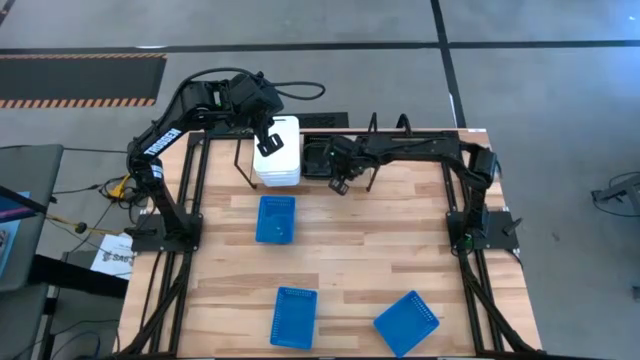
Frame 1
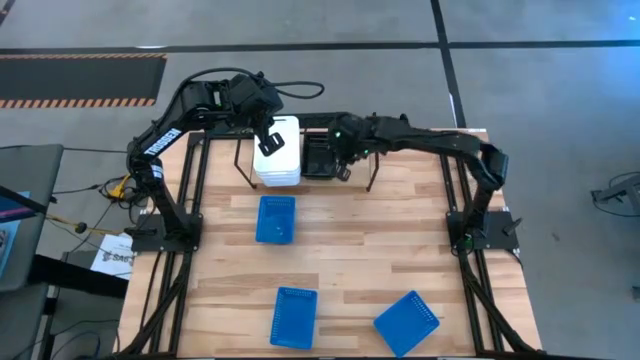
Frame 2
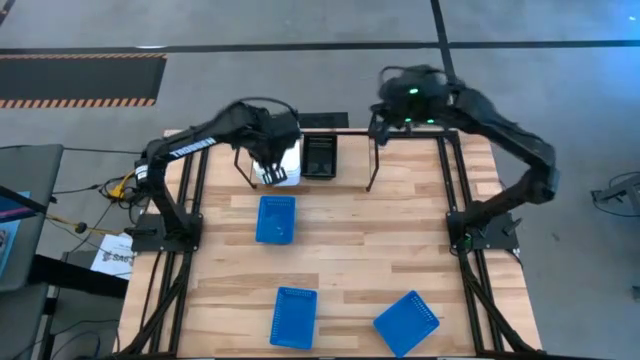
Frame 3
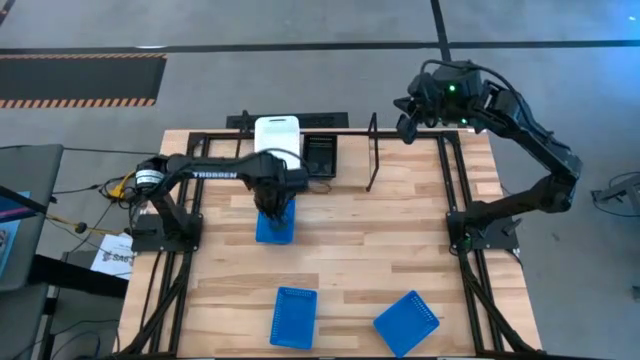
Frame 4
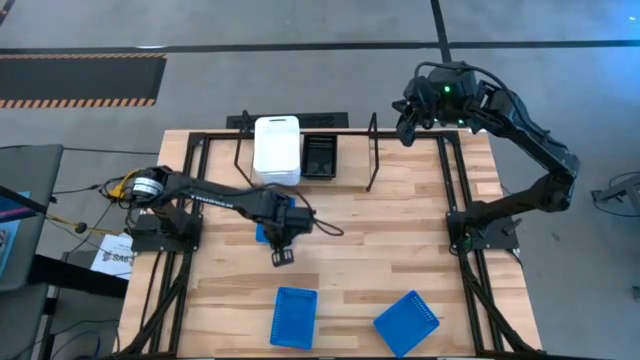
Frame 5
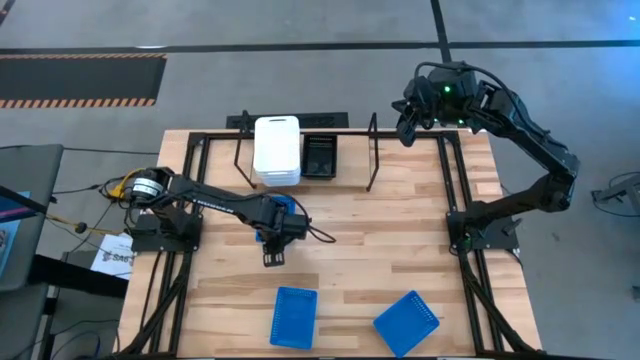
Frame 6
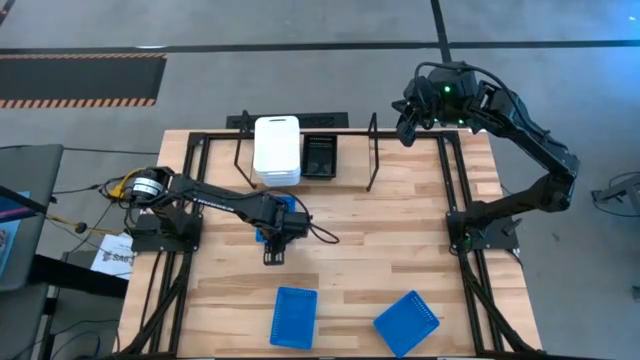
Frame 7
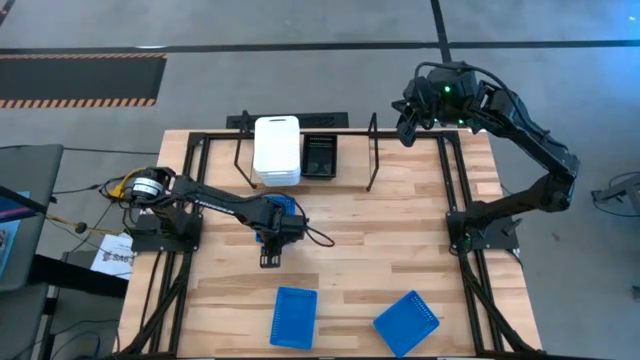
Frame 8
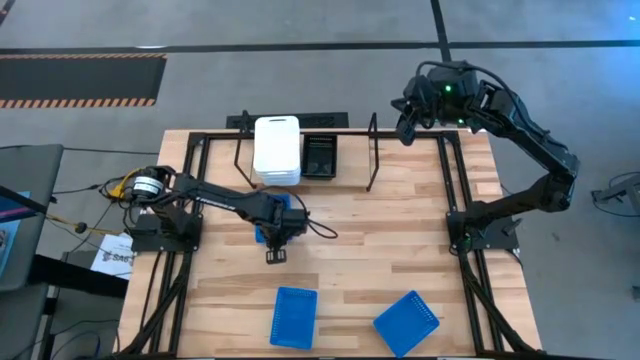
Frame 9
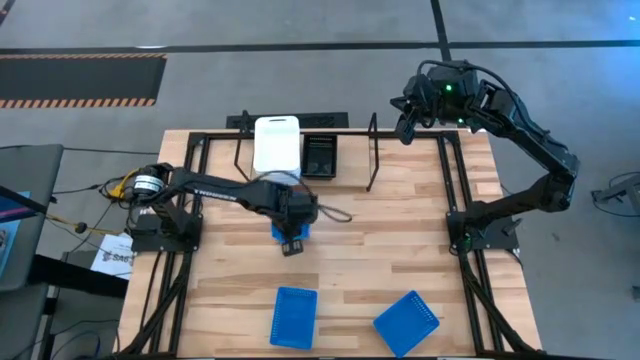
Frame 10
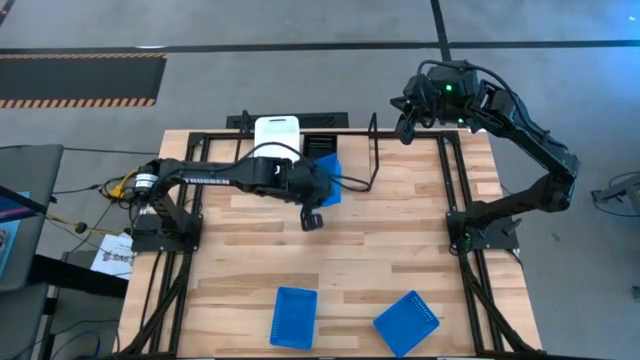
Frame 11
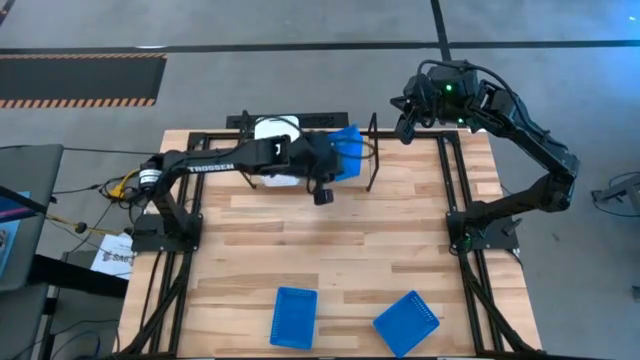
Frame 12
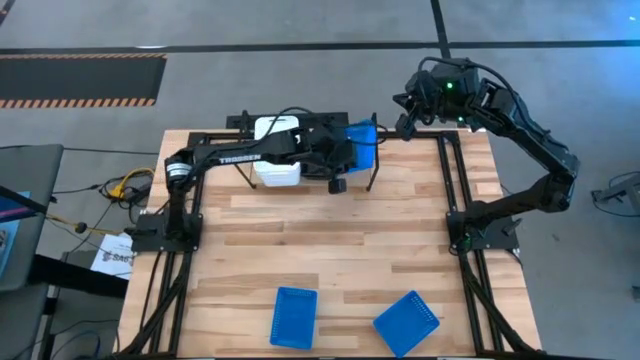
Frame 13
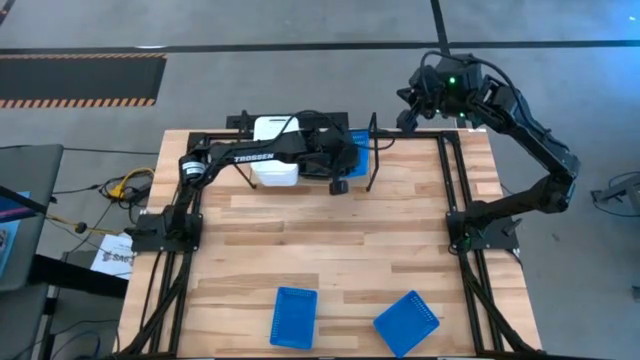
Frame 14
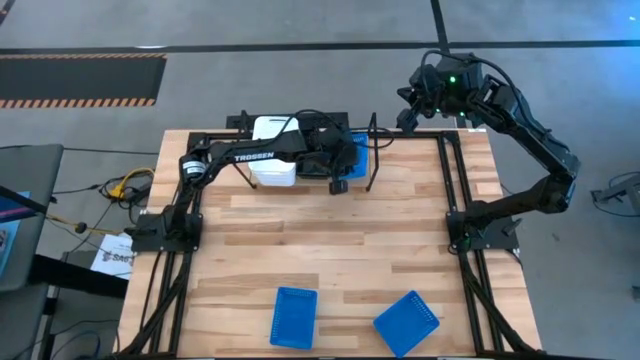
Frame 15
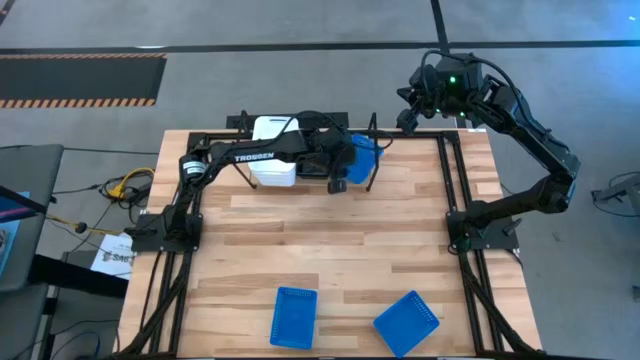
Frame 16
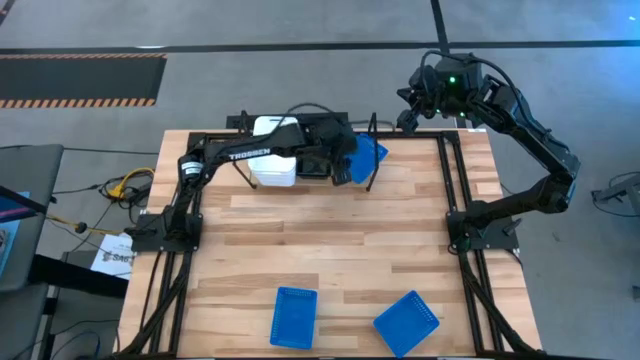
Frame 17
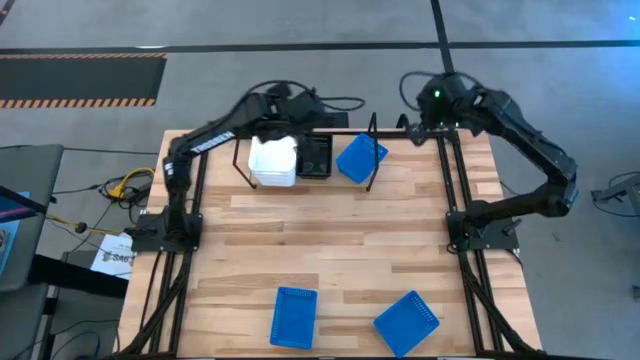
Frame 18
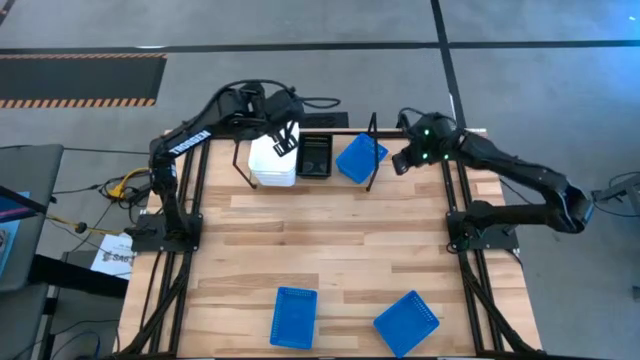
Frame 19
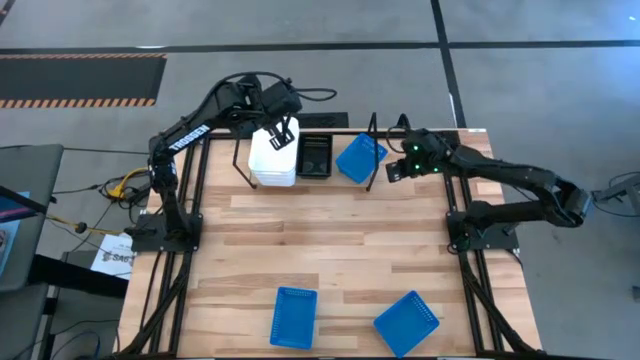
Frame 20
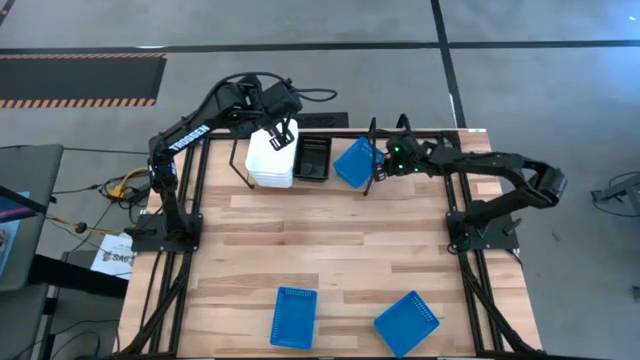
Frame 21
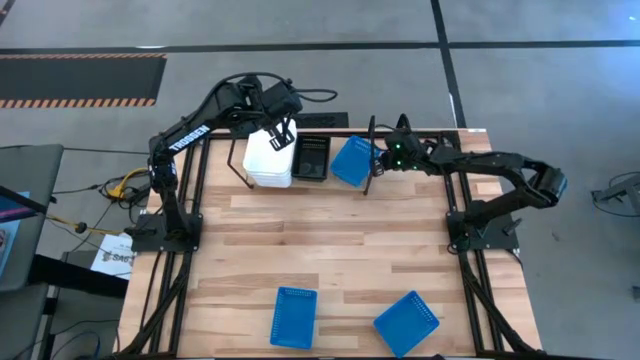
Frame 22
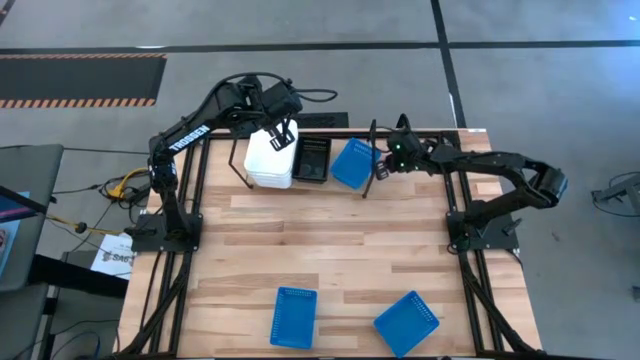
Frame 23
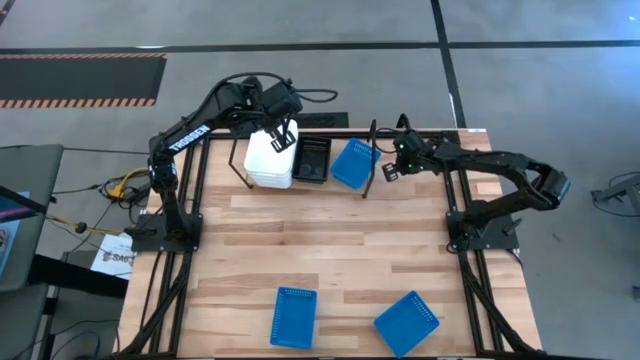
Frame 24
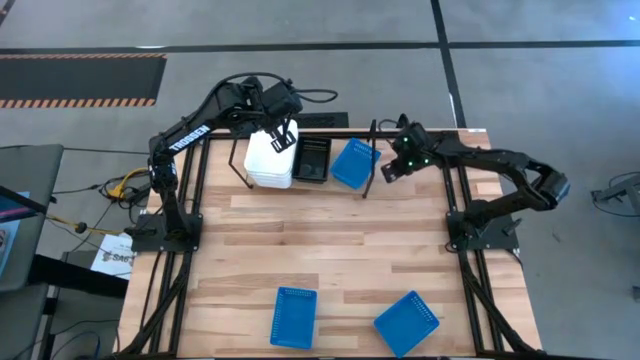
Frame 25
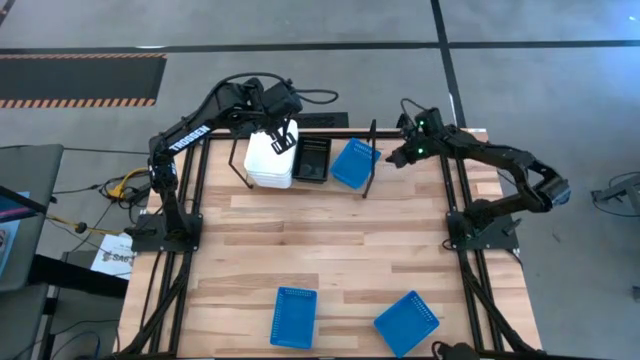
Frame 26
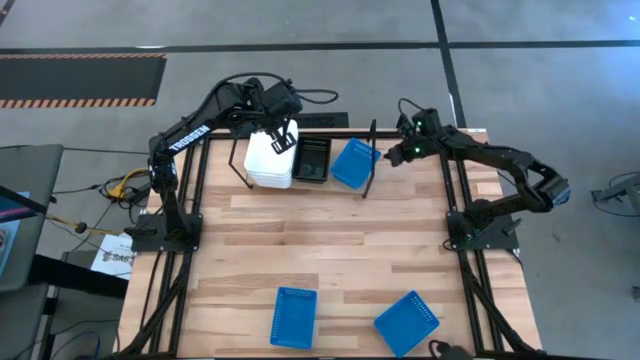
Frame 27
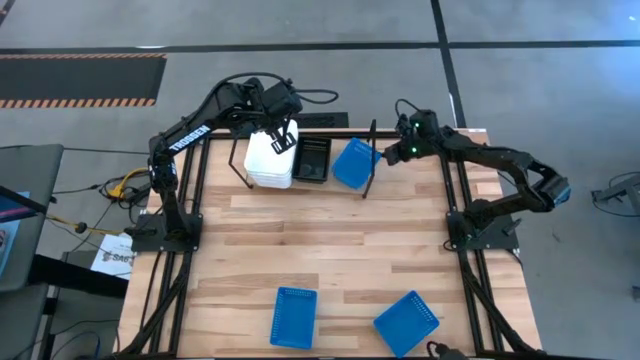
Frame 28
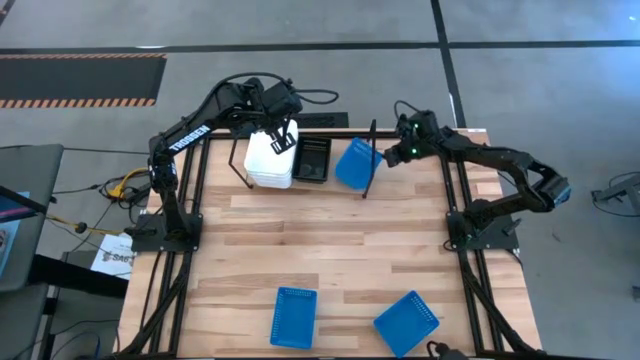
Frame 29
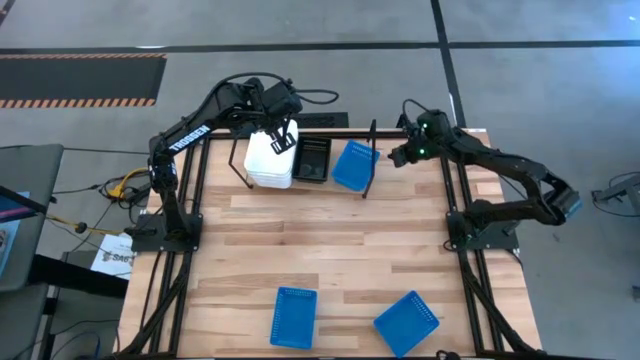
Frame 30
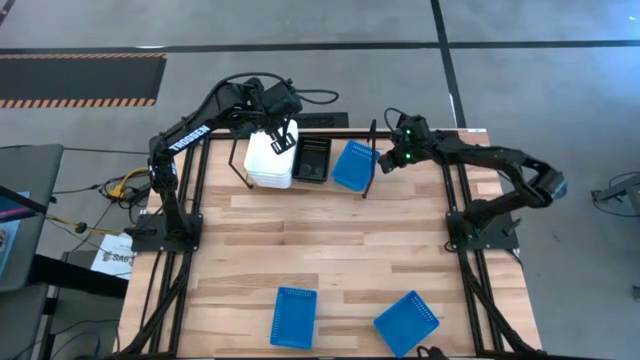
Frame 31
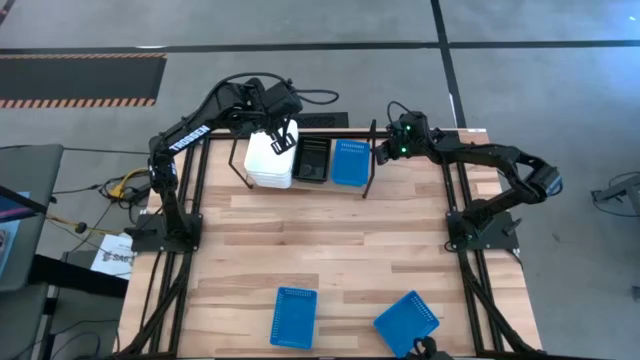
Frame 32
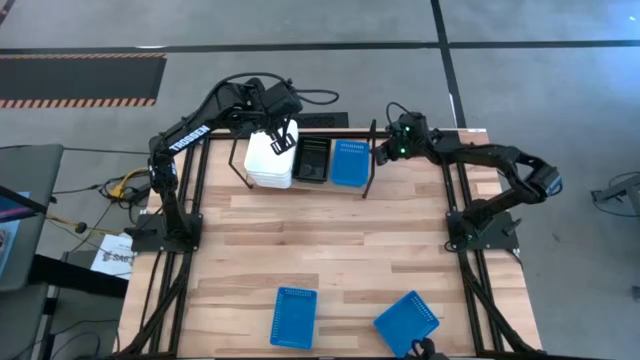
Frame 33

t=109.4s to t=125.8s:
Task: Stack baskets on shelf by color
Put the top blue bin on the shelf

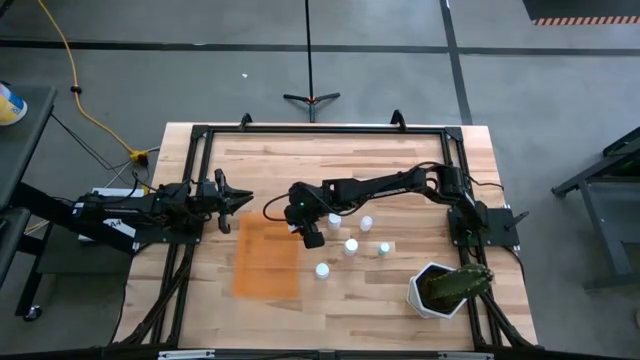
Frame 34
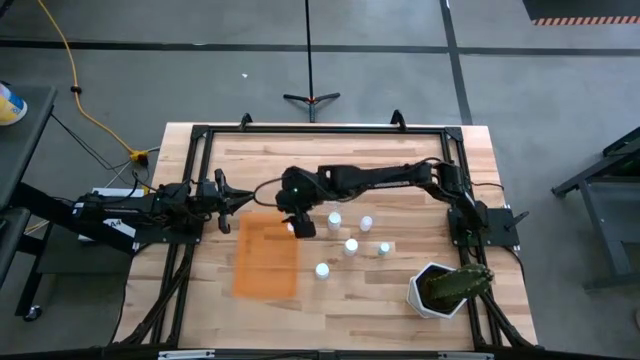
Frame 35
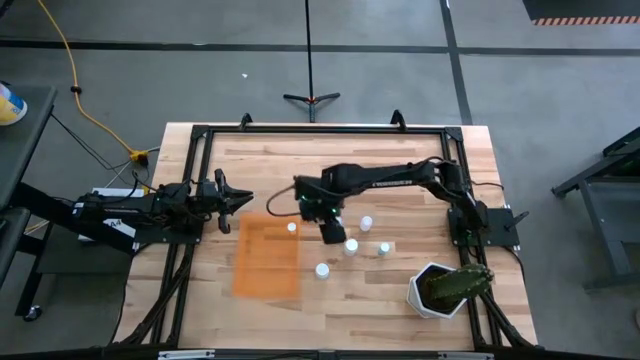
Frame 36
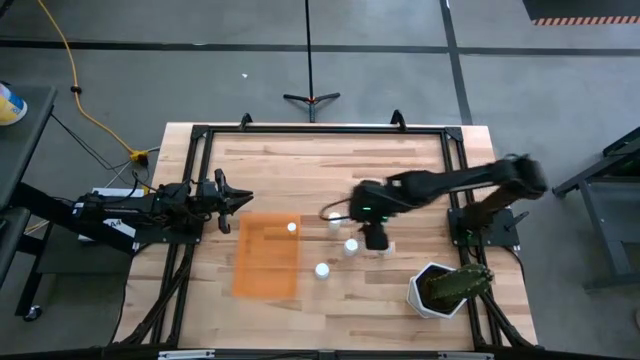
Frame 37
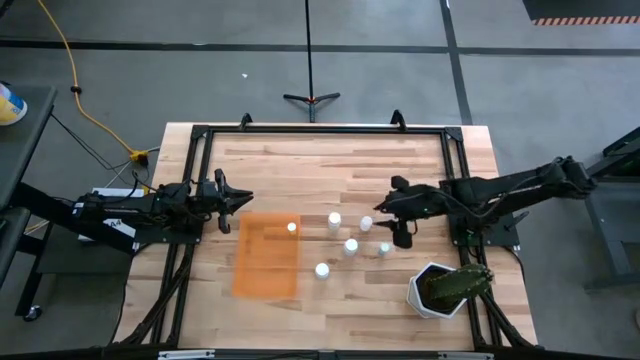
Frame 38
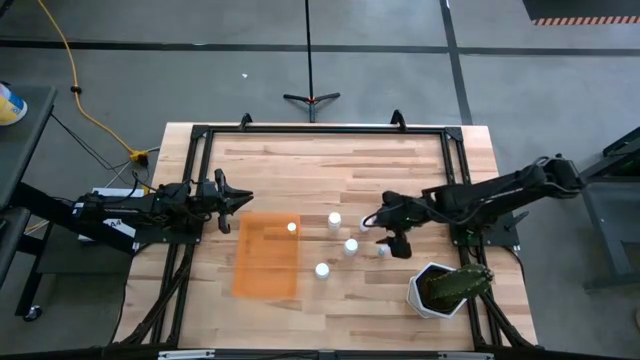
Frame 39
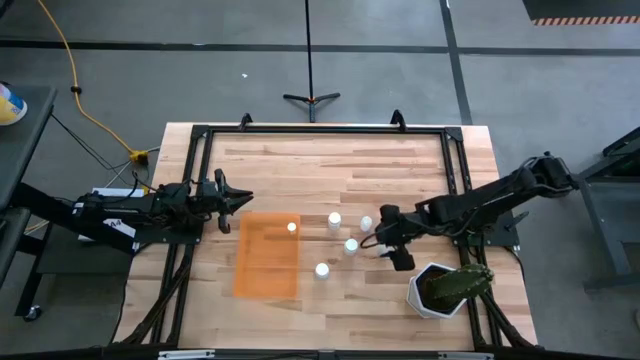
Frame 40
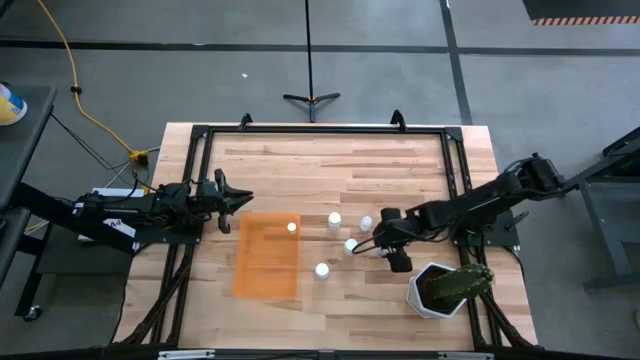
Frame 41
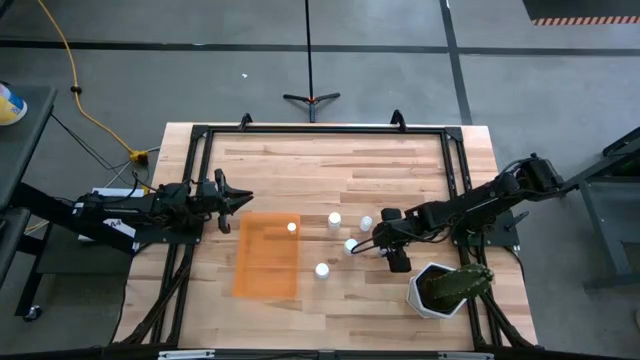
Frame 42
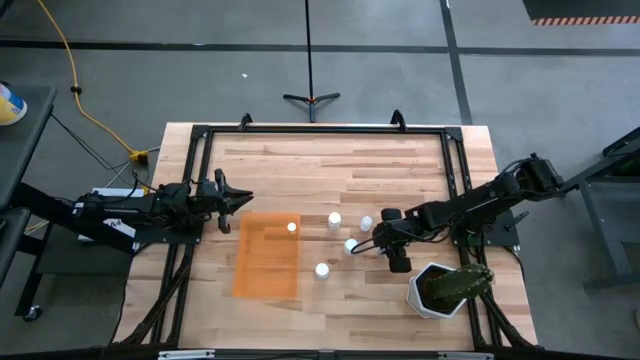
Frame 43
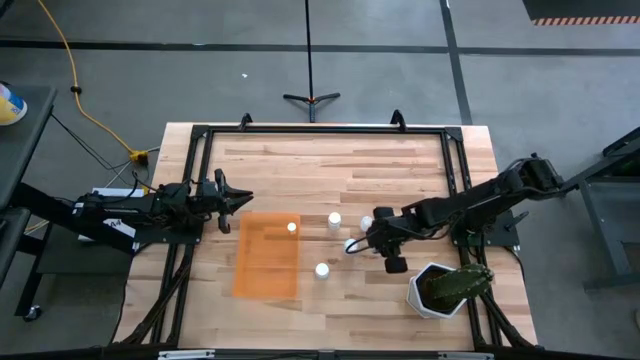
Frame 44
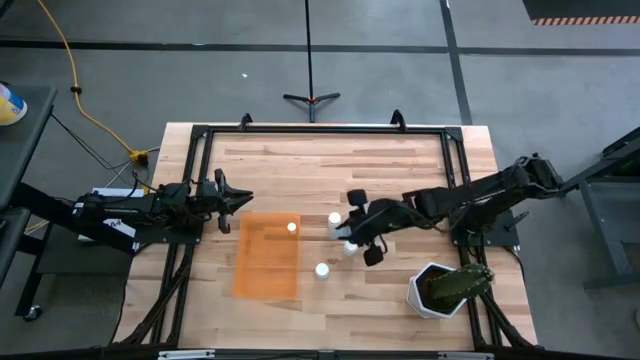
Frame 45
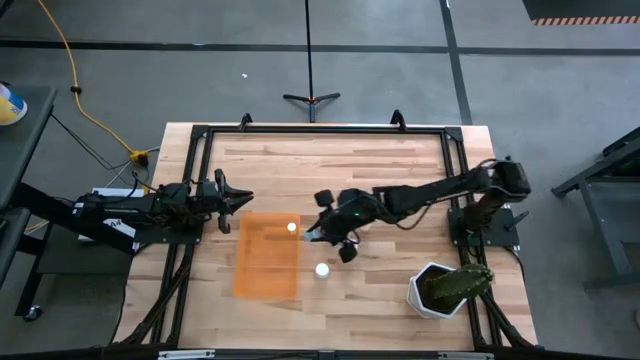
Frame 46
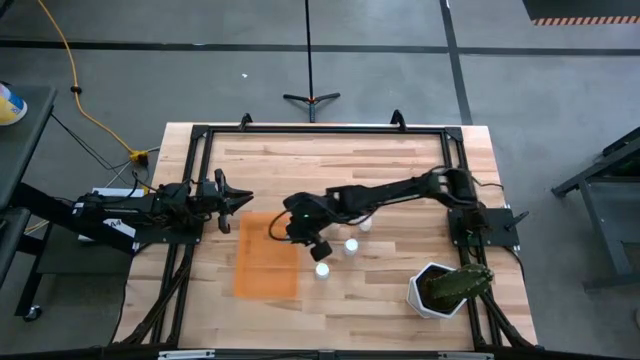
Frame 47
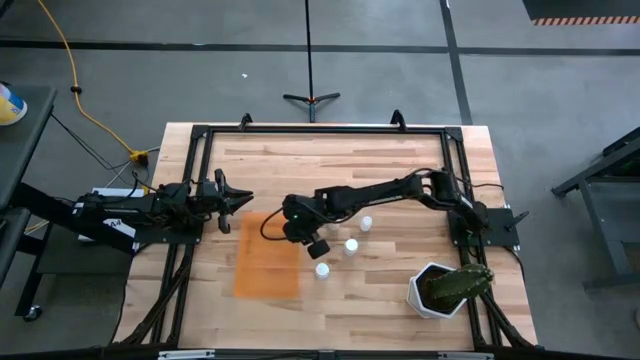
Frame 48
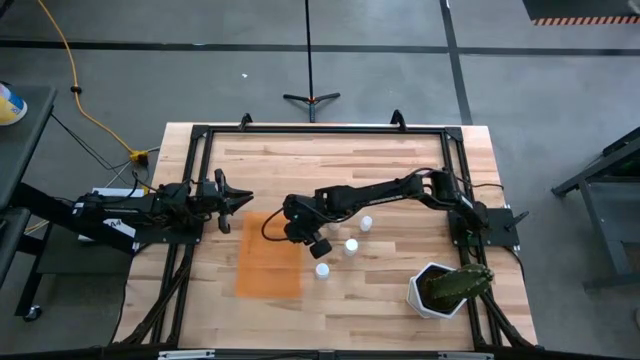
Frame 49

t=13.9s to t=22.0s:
Task: Pick and place pill bottles into a basket
Put the blue pill bottle into the orange bin
